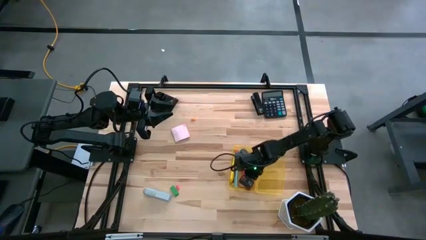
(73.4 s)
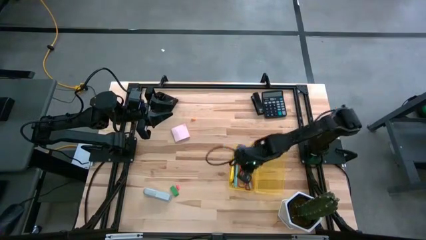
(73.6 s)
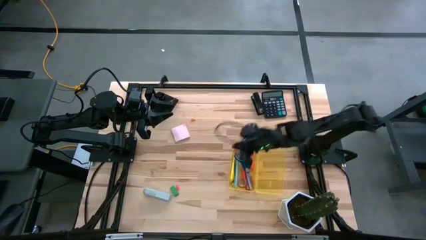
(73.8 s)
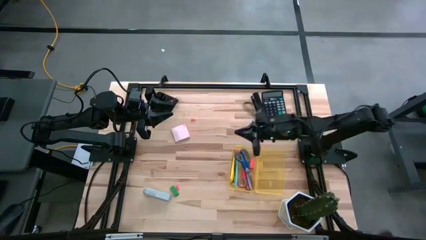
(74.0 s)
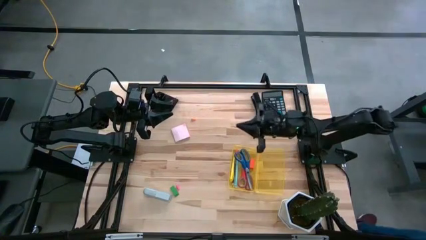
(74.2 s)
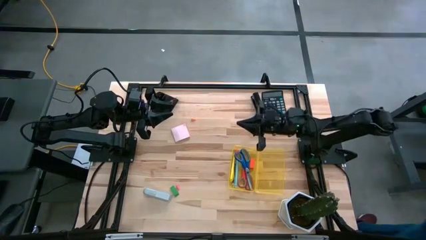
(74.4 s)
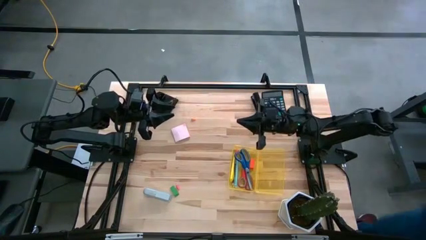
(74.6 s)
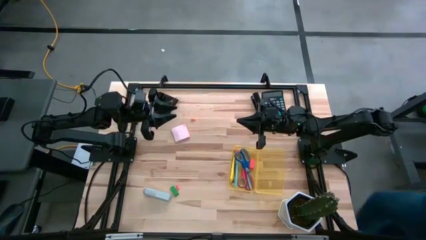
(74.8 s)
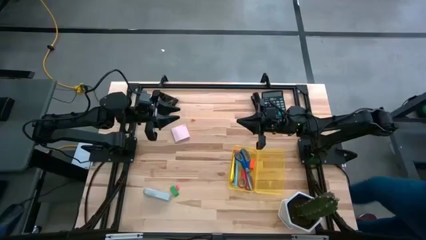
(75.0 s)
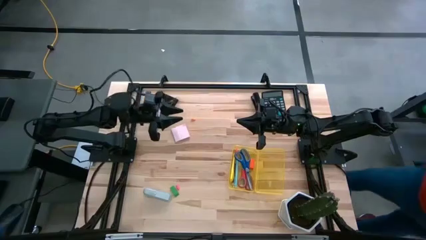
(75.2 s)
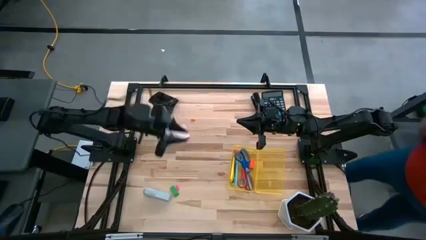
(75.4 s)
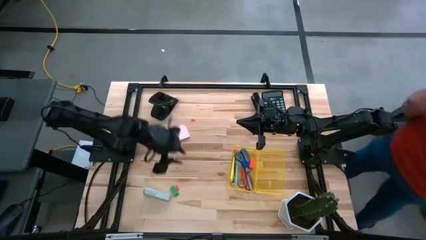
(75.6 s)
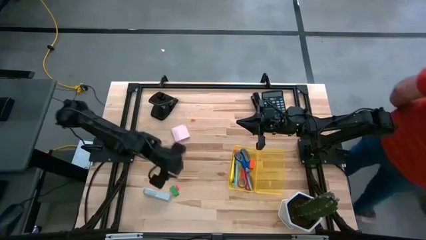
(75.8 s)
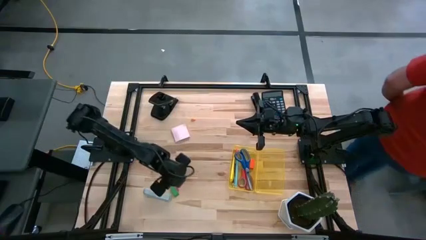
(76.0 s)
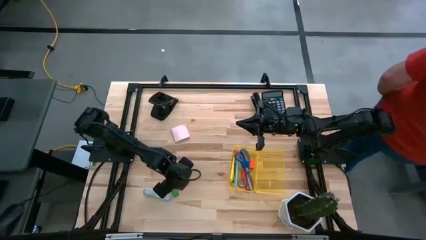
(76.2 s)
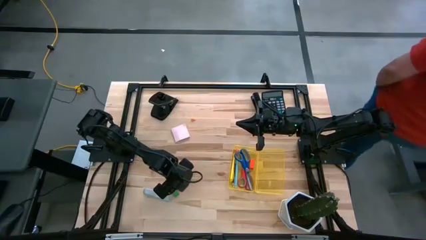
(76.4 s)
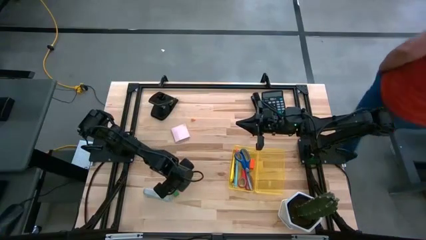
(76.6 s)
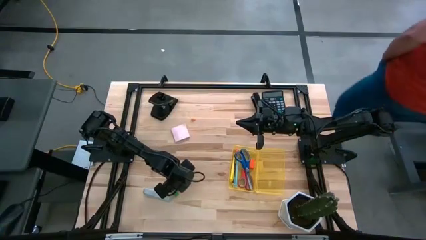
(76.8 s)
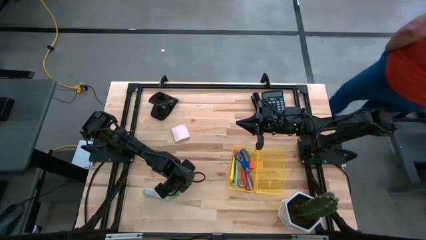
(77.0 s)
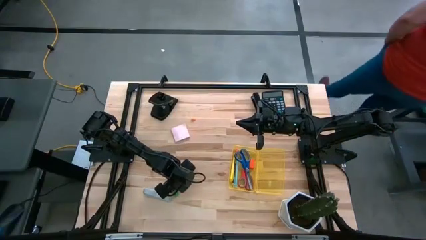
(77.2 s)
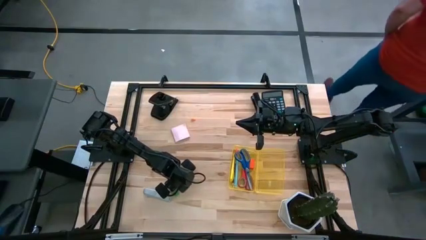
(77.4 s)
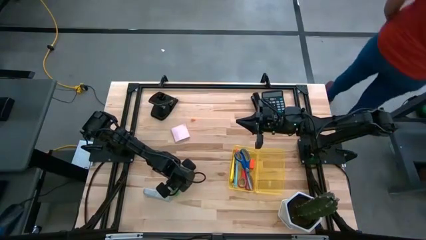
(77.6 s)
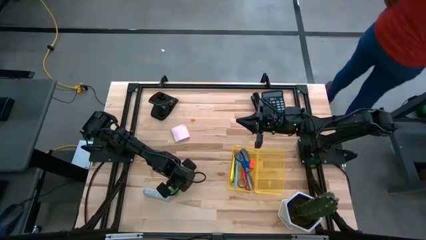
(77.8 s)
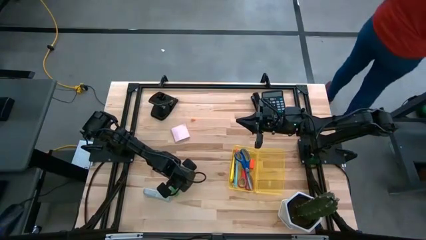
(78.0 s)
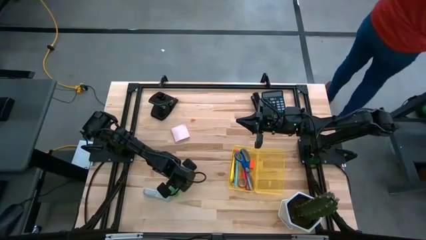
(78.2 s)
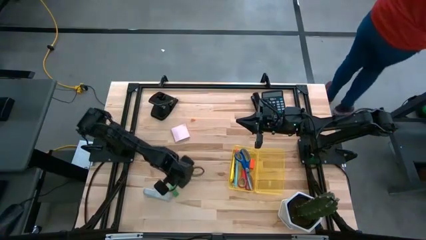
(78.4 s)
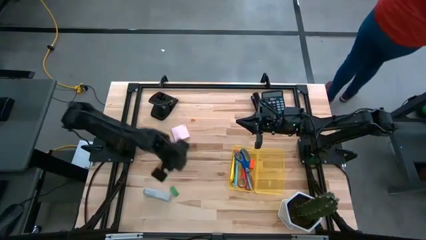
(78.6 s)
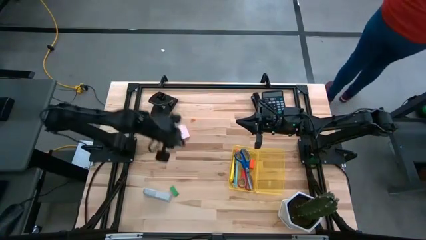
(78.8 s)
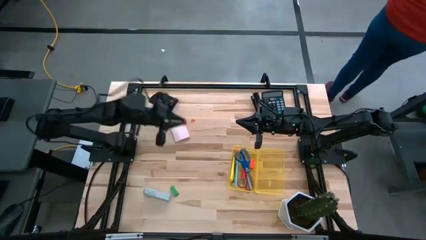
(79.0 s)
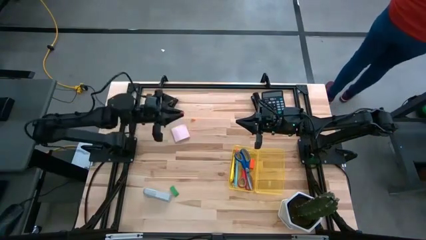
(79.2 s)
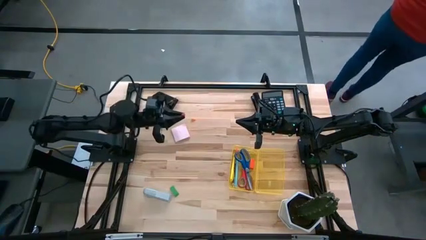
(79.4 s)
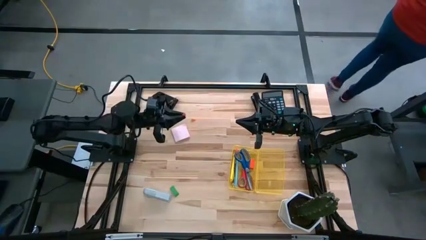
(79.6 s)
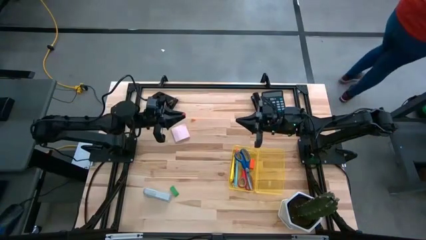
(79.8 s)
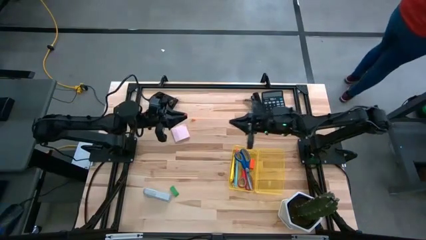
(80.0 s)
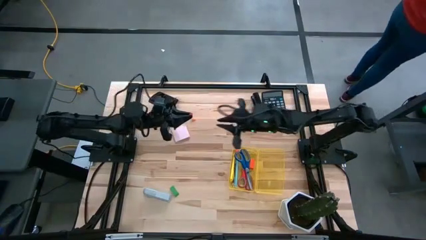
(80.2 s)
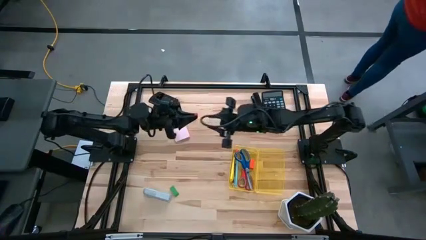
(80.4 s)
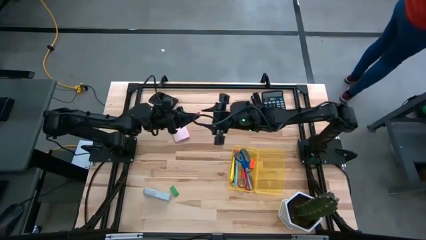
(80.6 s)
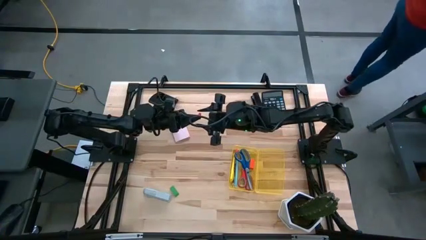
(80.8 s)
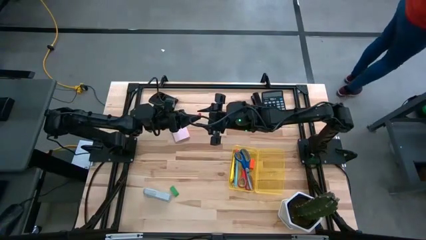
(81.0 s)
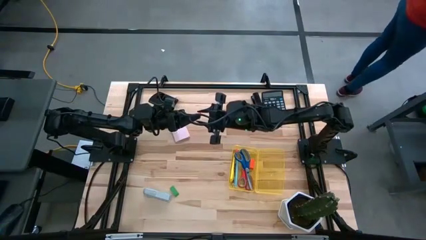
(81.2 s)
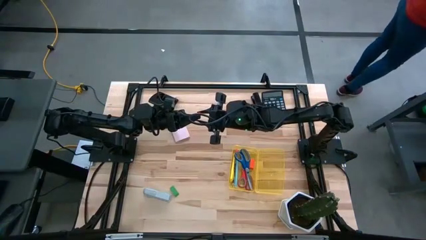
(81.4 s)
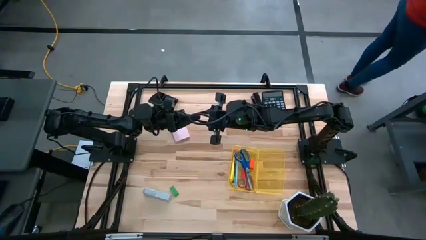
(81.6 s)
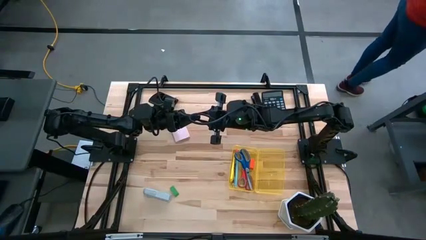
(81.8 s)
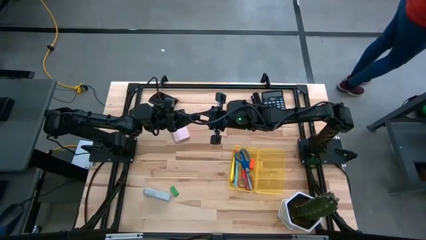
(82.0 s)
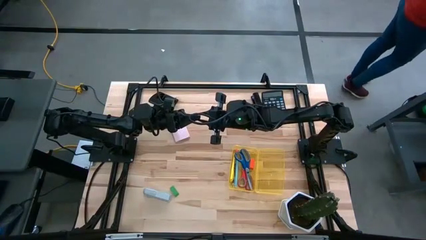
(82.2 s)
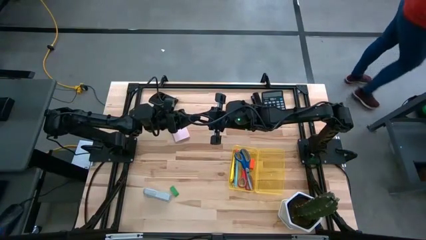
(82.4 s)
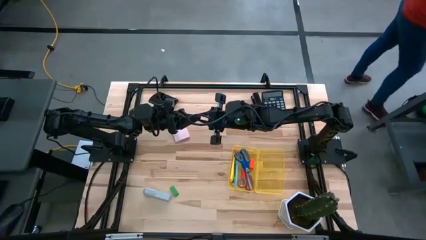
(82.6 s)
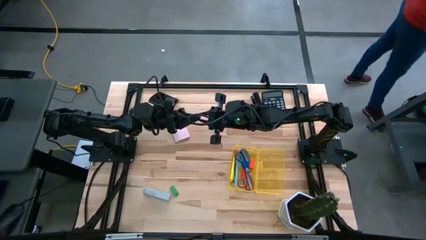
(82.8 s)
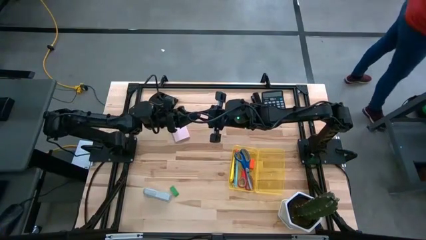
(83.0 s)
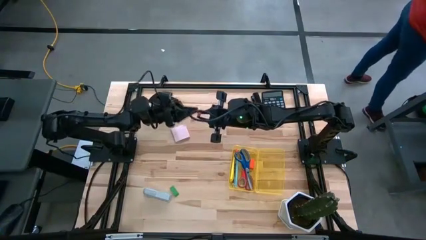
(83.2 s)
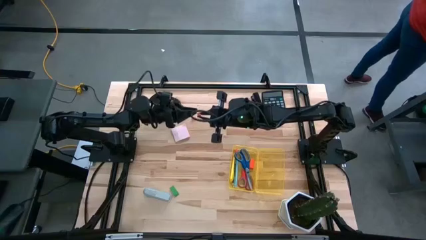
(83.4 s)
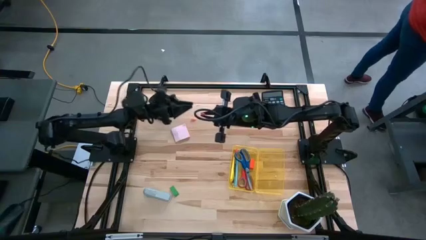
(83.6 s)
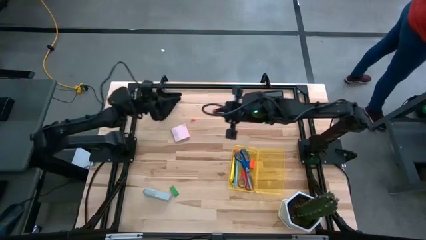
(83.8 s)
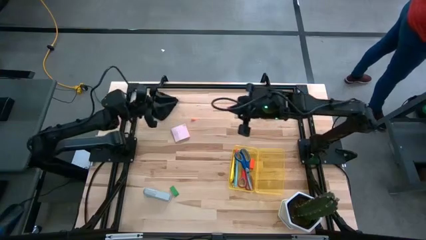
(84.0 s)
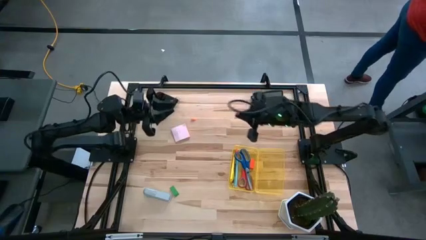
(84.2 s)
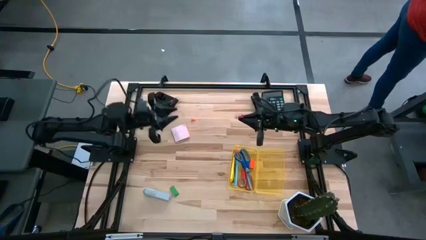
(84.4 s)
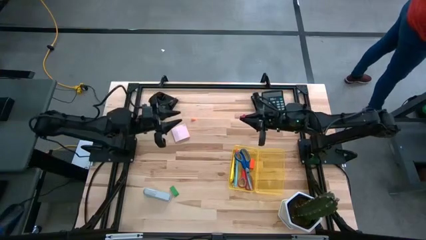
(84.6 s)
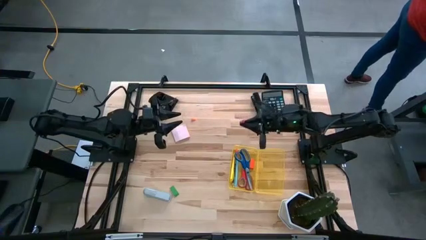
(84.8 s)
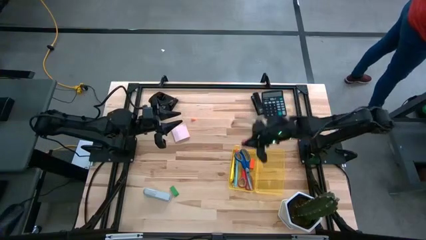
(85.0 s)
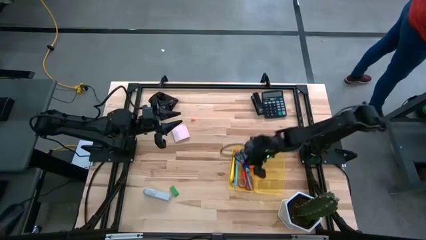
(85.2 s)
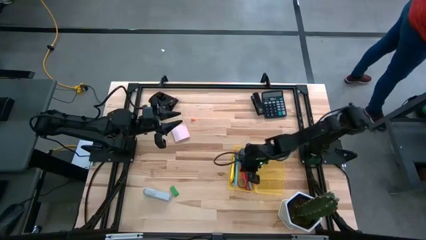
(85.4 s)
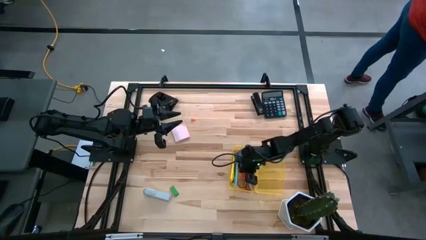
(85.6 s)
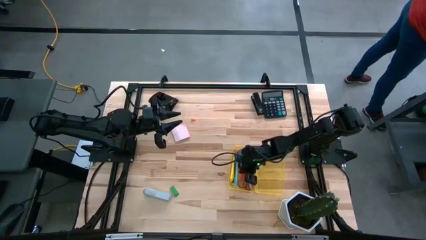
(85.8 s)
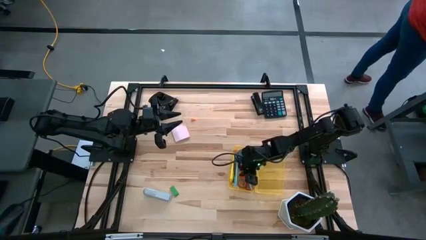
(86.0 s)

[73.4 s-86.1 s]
Task: Pack school essentials
Put the pink eraser into the supply box

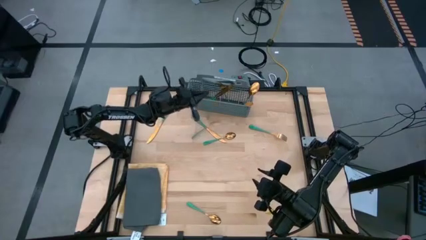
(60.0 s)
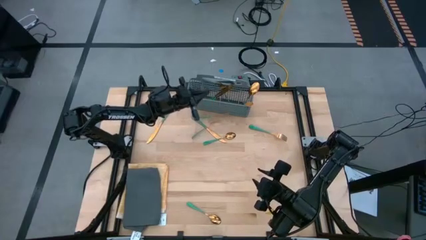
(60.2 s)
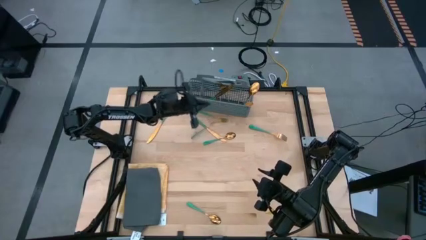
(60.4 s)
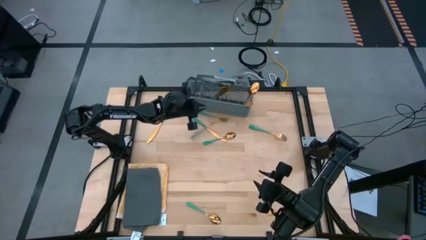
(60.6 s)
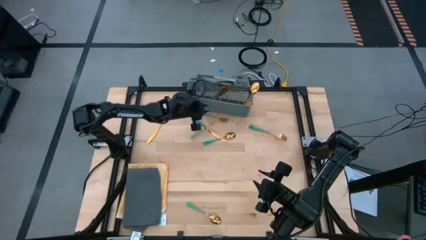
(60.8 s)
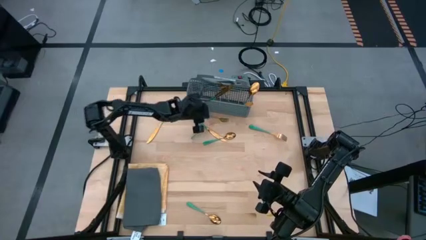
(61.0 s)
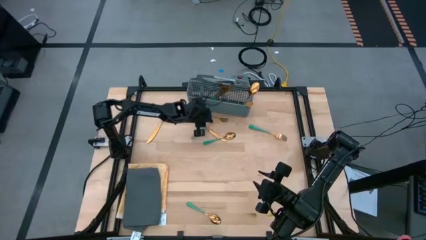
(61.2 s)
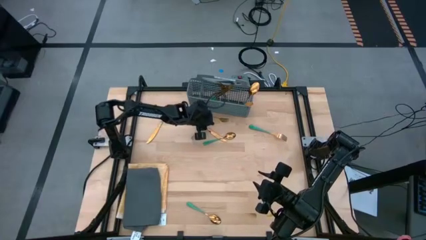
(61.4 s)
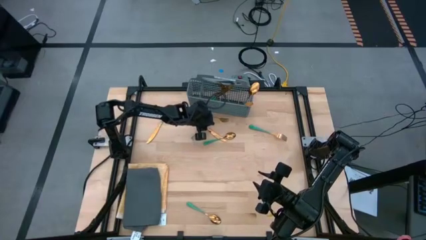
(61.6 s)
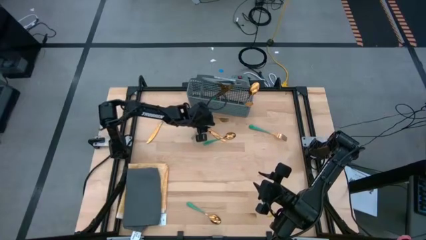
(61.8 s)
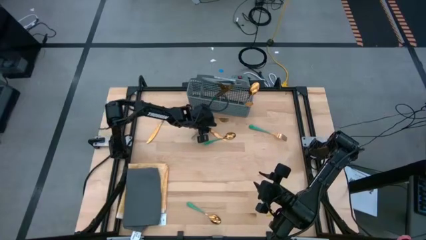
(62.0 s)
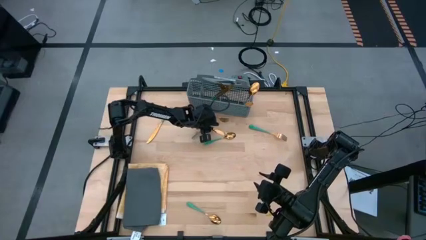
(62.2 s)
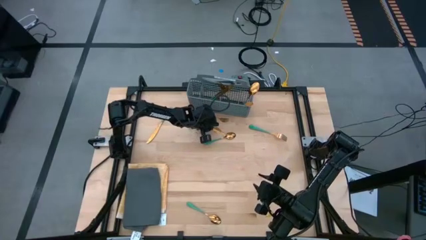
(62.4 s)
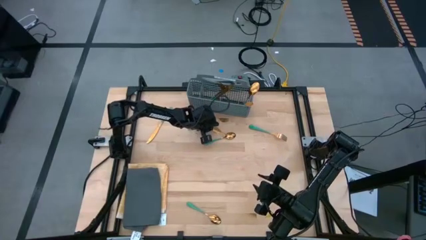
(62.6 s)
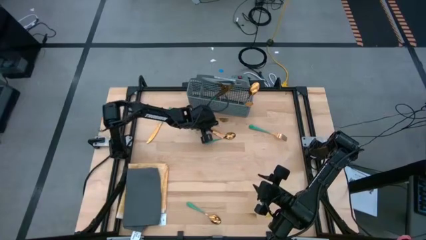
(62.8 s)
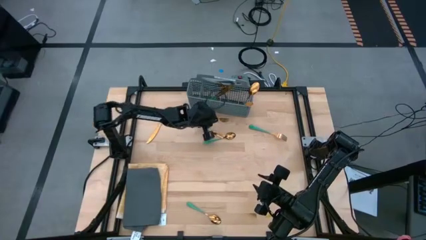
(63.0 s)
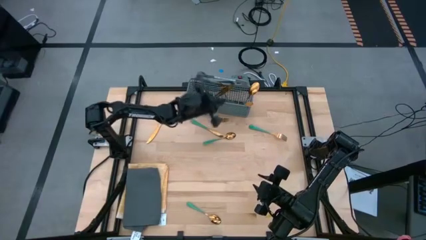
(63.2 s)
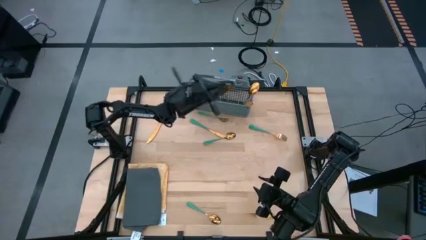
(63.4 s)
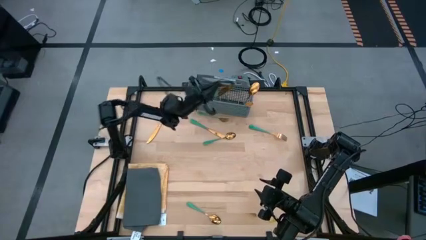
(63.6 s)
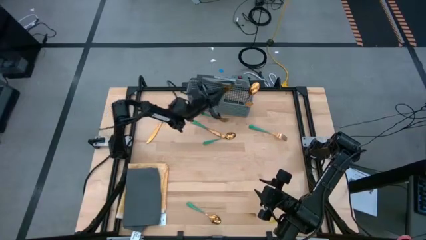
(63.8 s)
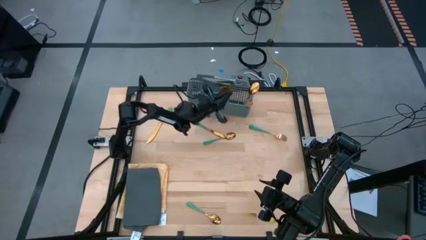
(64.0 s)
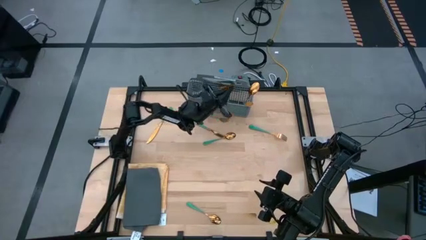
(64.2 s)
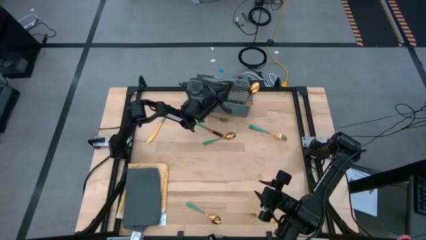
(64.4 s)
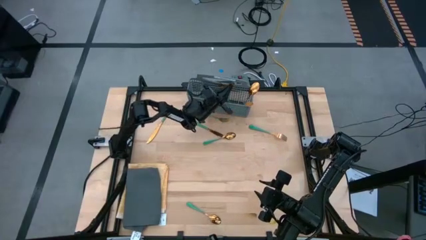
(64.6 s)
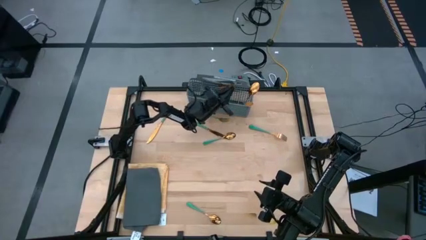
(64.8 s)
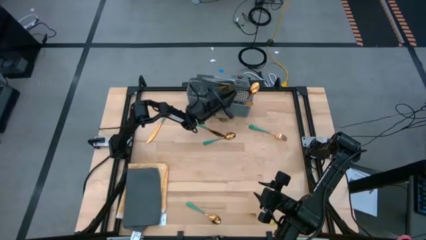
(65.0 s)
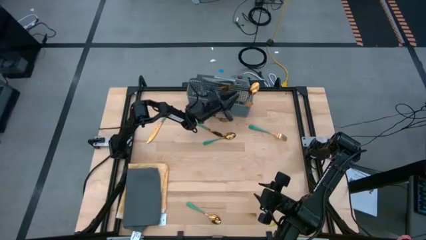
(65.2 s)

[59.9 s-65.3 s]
Task: Sort silverware
Put the green fork into the dishwasher utensil holder
